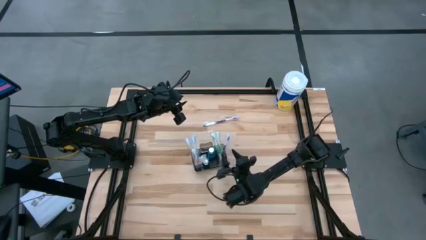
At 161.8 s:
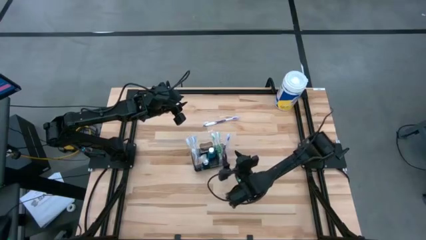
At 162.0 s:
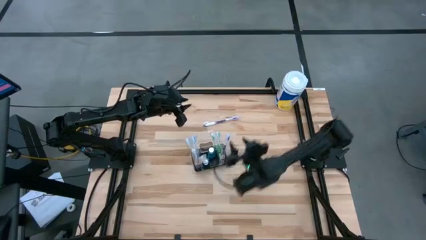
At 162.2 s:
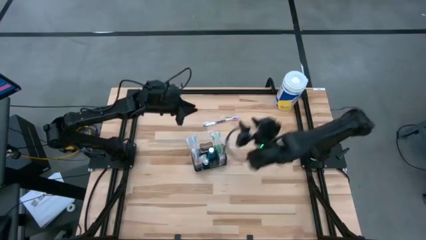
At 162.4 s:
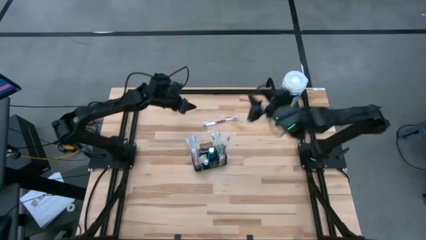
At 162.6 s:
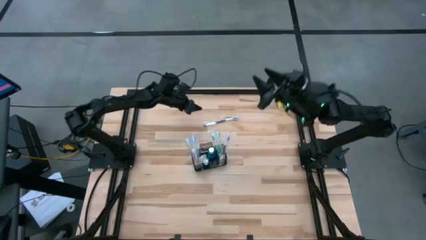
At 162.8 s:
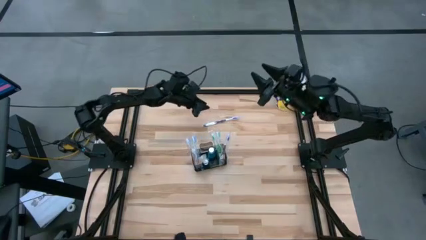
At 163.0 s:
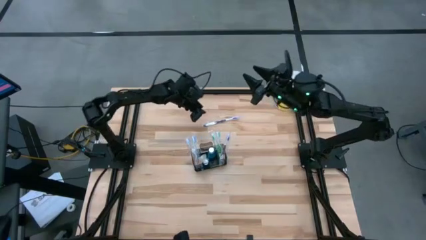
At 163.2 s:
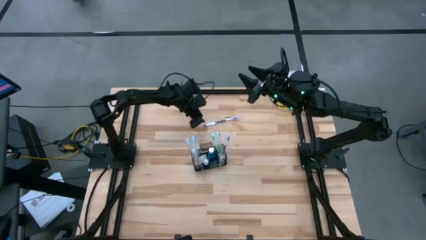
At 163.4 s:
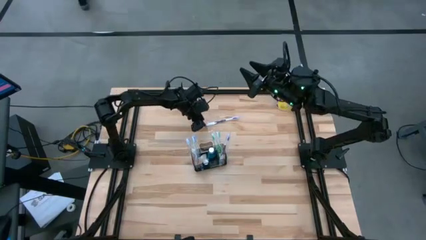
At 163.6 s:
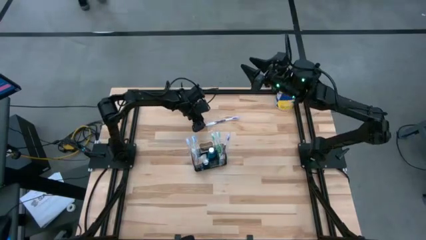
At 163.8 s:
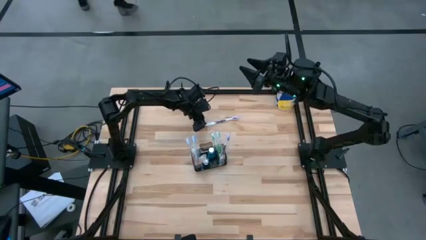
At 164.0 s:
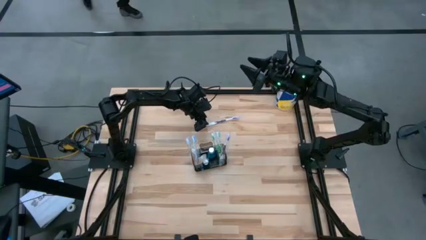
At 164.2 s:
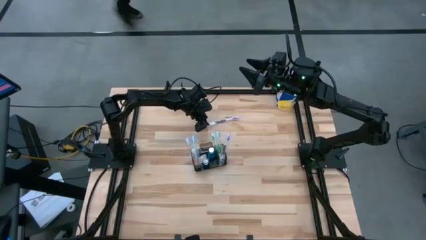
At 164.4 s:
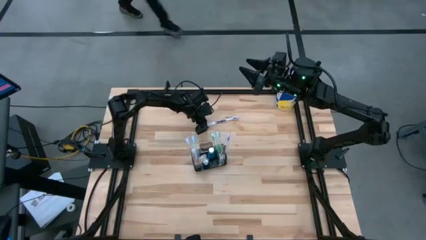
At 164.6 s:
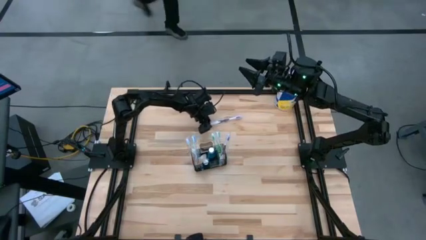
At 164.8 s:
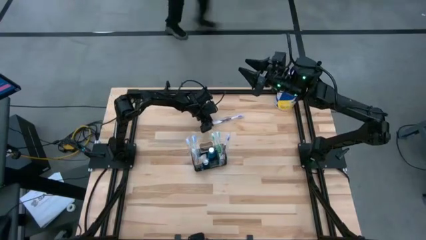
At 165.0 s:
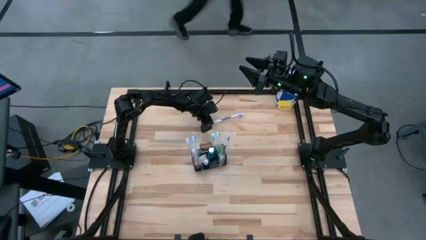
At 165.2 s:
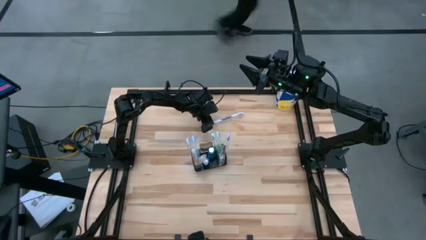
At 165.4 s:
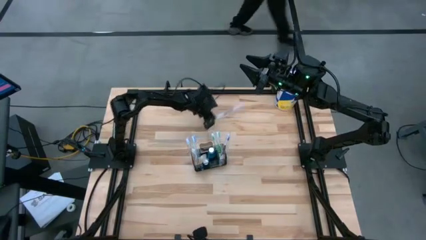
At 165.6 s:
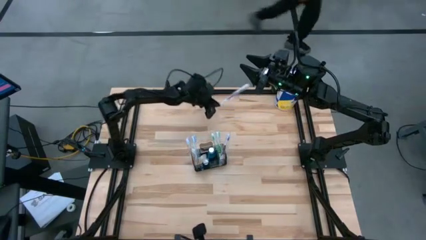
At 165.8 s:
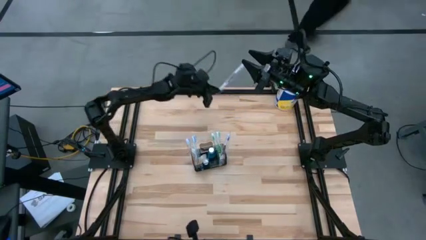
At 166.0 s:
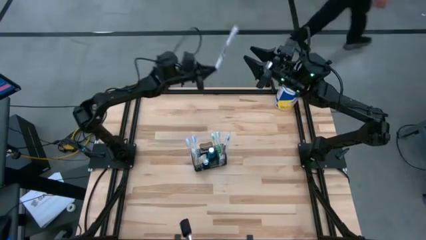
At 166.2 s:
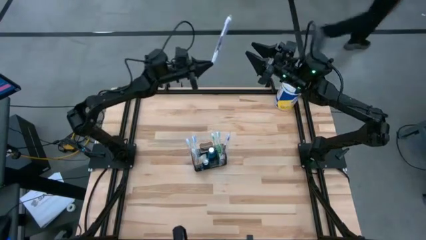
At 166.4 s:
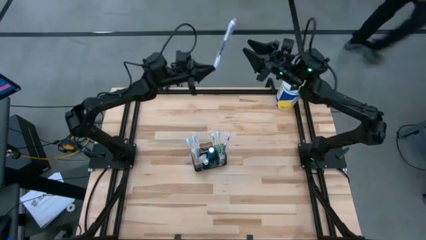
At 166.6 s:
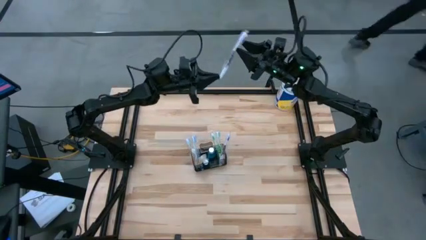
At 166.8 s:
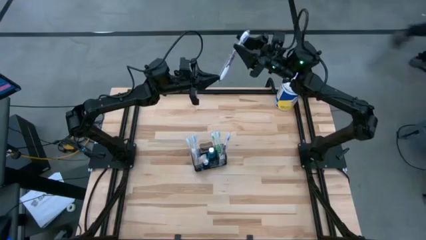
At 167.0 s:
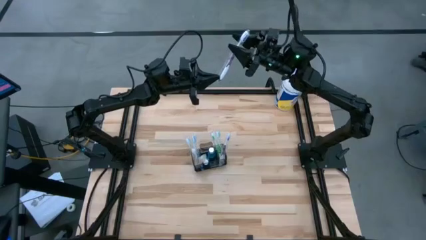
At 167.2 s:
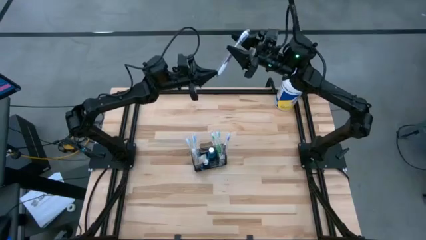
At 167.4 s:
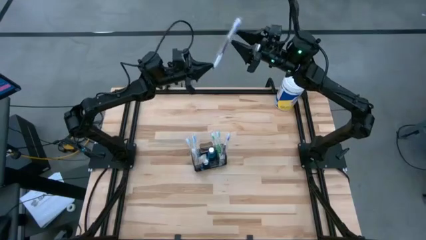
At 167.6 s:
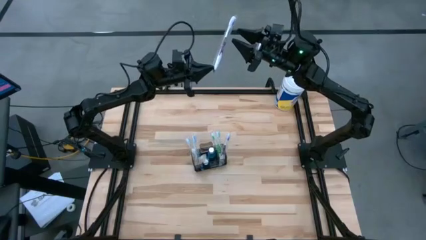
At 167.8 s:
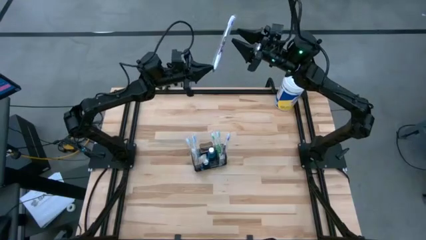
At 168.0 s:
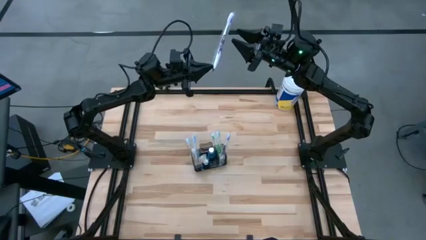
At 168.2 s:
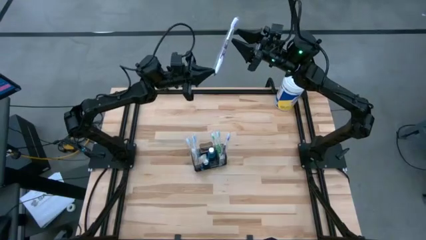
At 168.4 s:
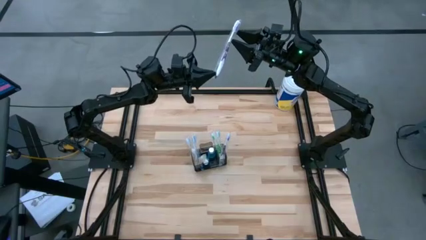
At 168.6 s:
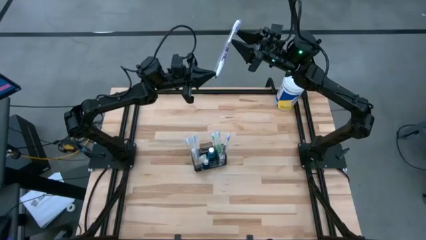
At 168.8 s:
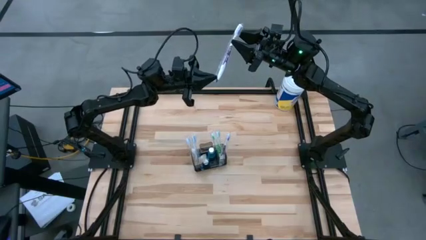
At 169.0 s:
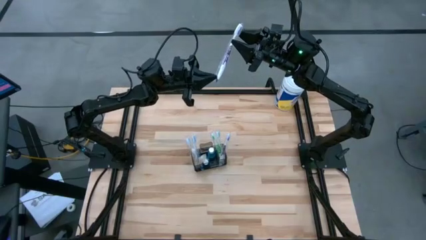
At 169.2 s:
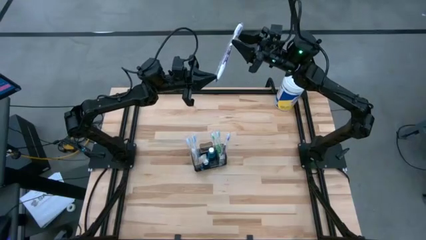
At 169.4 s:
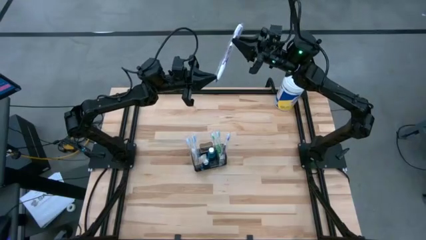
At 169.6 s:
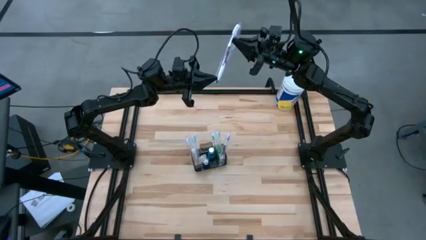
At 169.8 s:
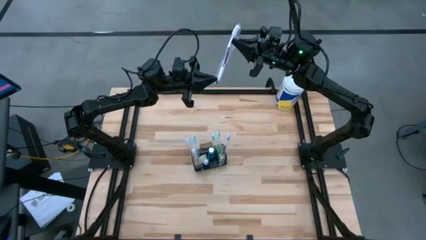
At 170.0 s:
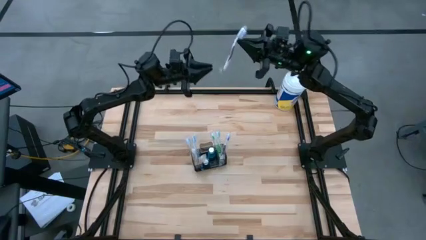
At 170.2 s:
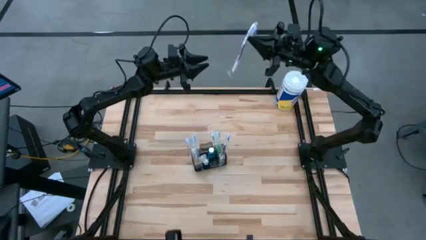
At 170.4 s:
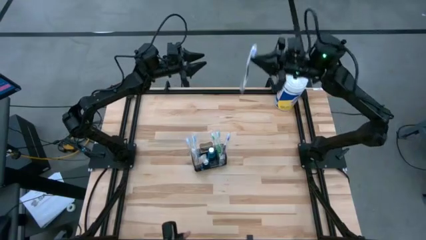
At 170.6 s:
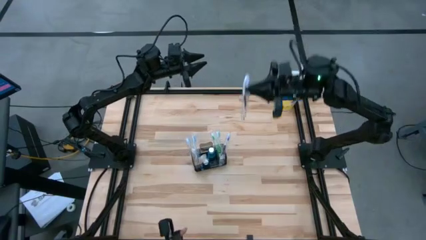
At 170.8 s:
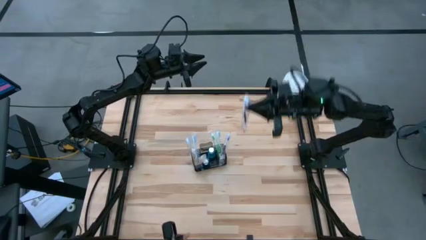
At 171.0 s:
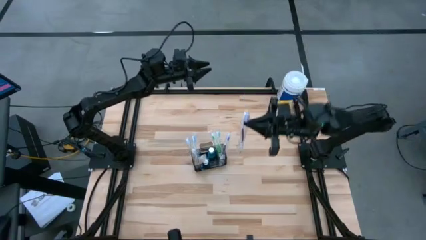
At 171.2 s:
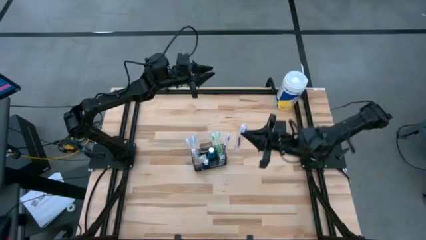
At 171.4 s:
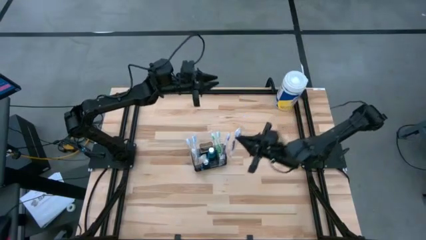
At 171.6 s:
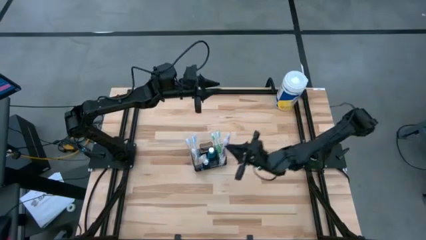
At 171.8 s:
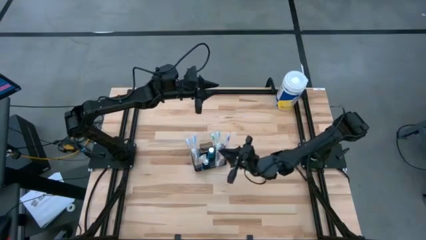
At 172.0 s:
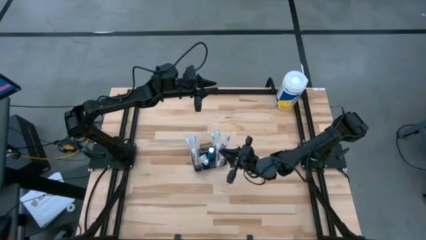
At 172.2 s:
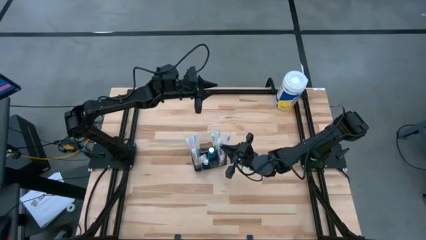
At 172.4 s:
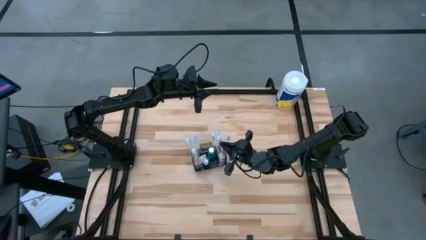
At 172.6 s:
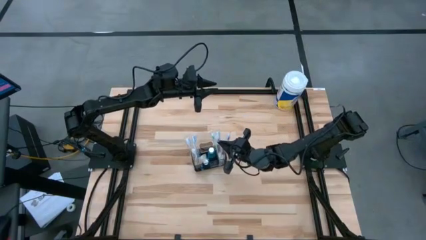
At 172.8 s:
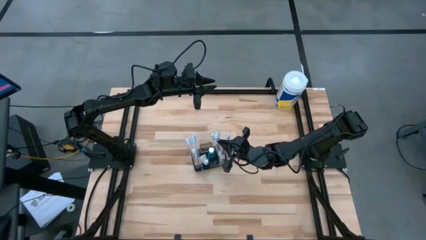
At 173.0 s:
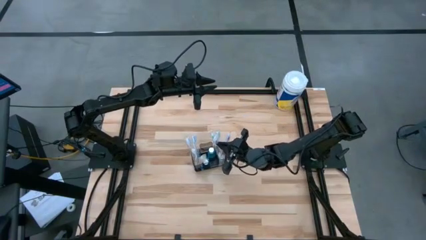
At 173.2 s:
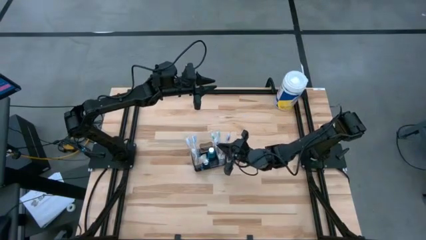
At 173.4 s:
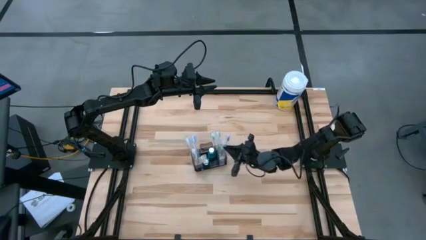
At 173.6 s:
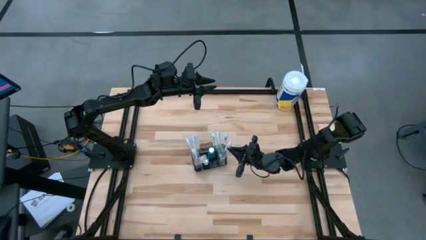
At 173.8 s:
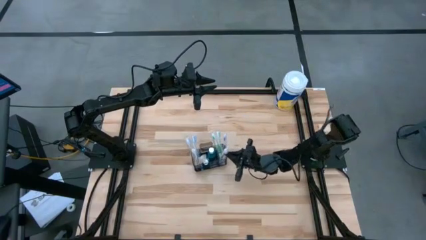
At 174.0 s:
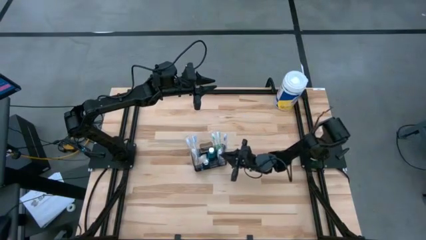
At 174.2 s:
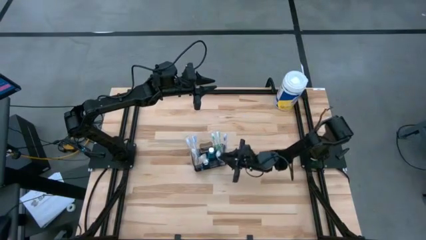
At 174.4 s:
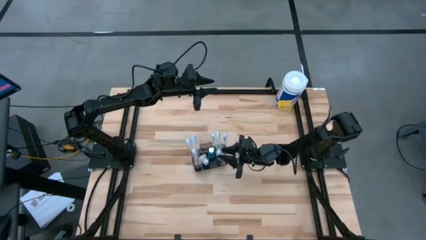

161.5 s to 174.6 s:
Task: Pick & Place toothbrushing station
Put the purple toothbrush into the mesh organizer
